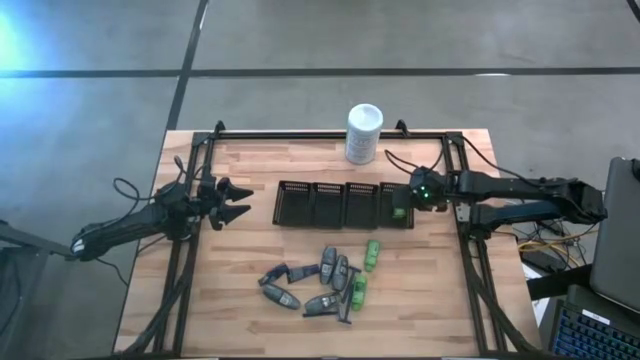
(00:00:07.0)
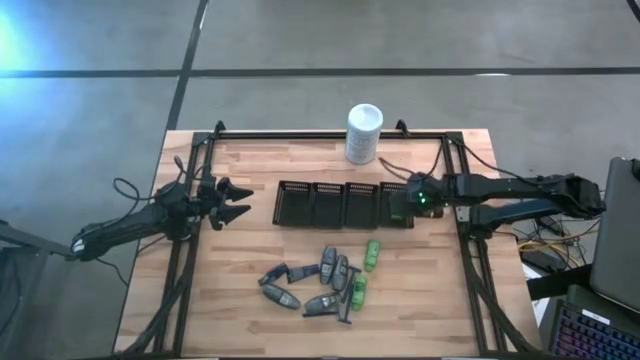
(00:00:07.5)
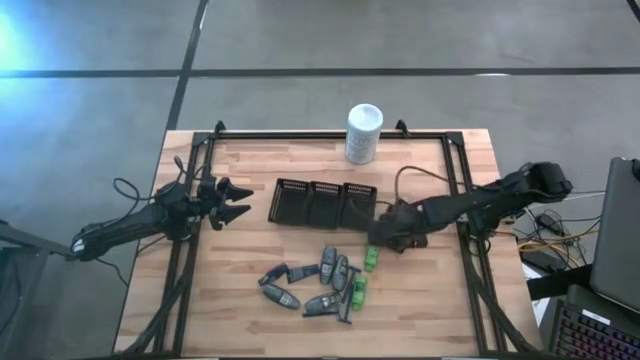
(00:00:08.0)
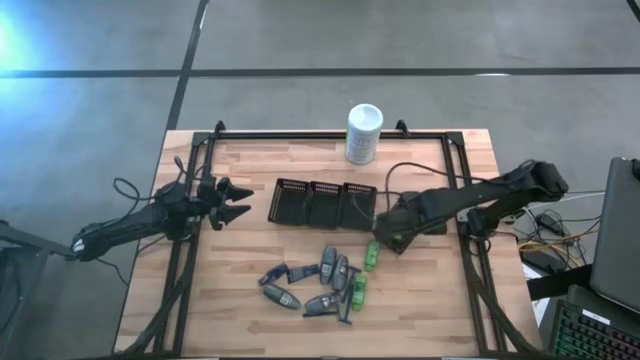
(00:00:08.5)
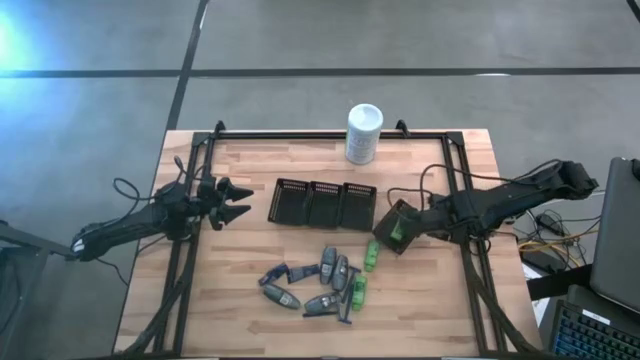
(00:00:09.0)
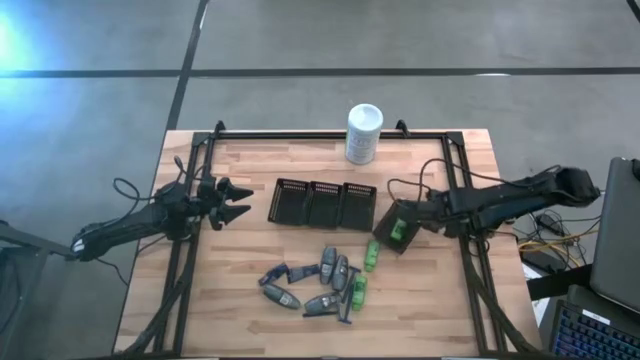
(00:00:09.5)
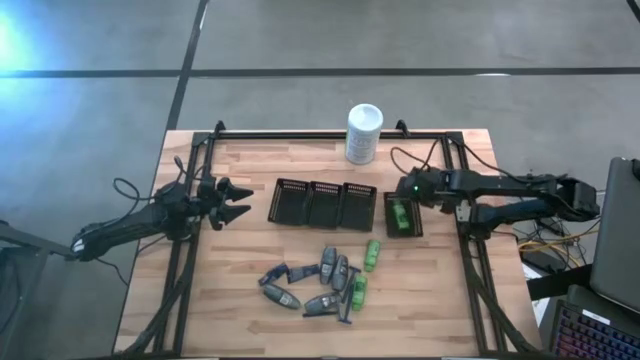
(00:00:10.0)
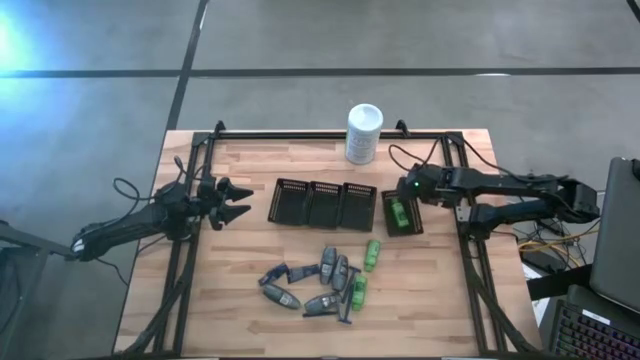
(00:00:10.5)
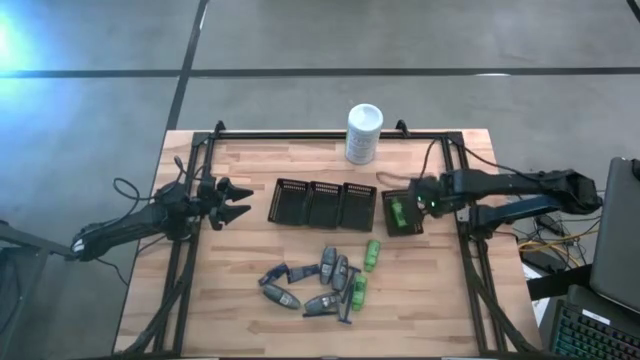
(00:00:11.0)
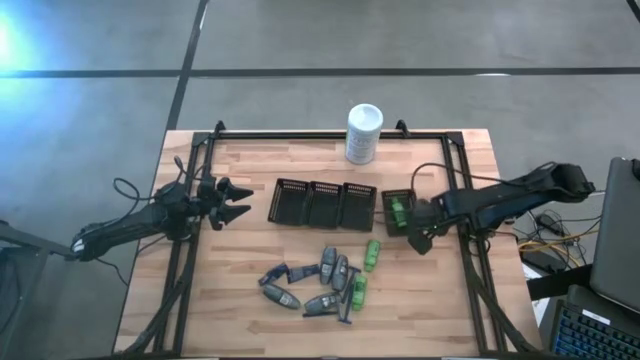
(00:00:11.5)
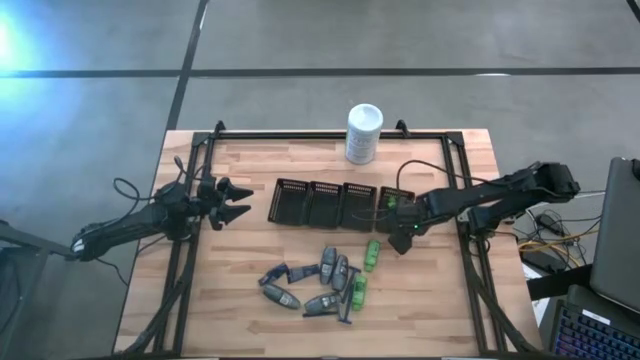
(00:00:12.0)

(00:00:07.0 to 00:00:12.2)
Task: Pick & Place Travel size toiletries
Adjust the black bin on the table

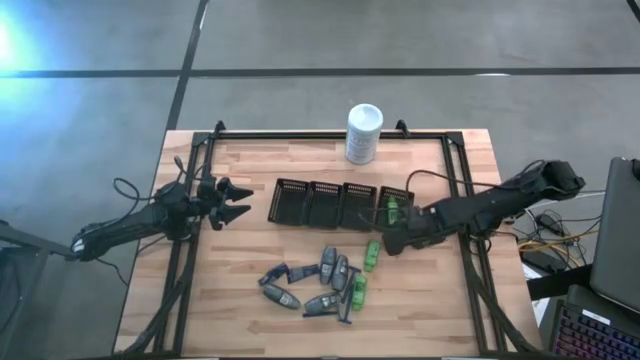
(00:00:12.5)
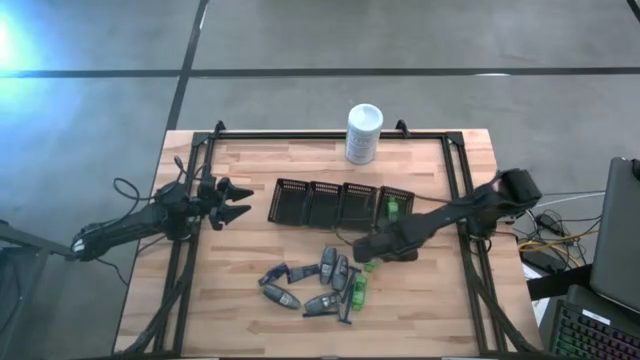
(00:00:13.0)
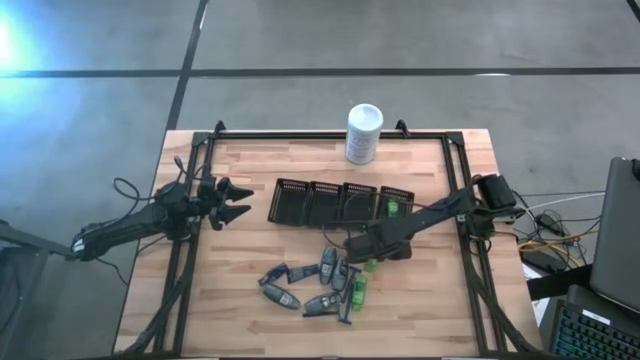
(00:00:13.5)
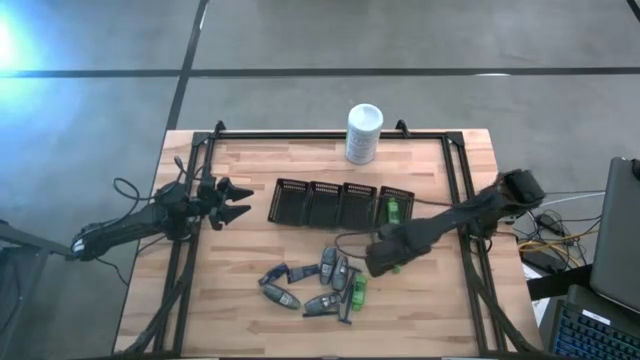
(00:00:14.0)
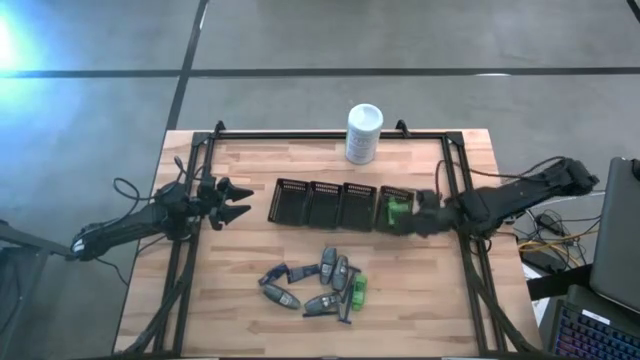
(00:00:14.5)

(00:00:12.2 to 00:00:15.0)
Put the green shampoo into the right black bin

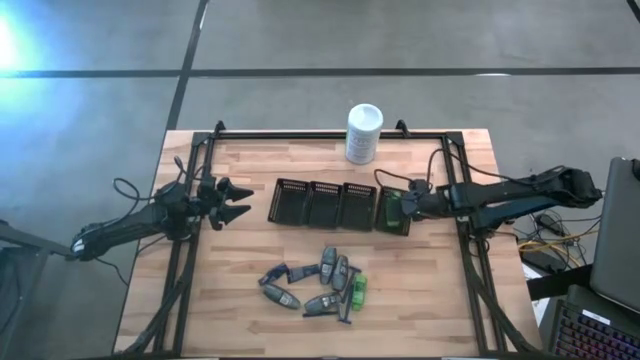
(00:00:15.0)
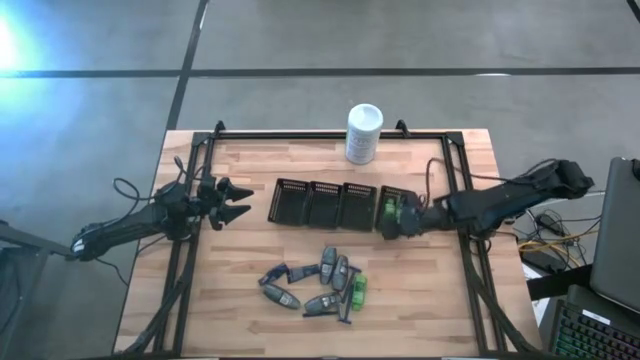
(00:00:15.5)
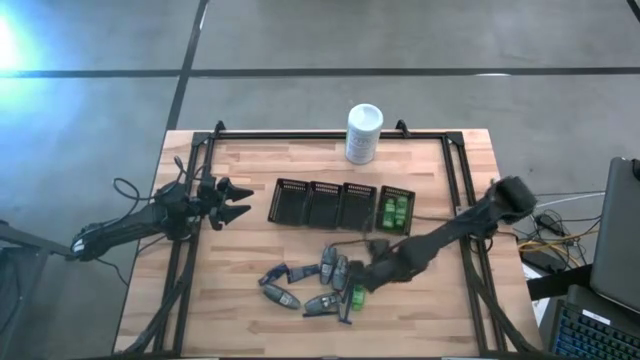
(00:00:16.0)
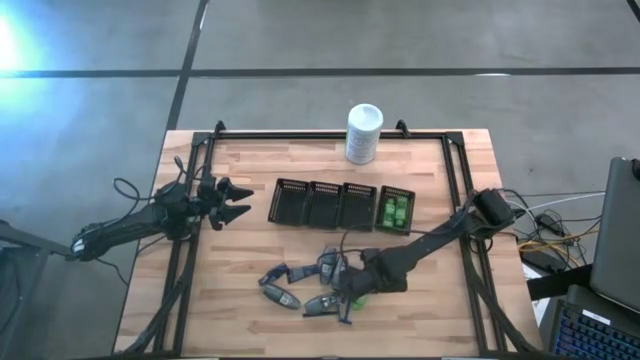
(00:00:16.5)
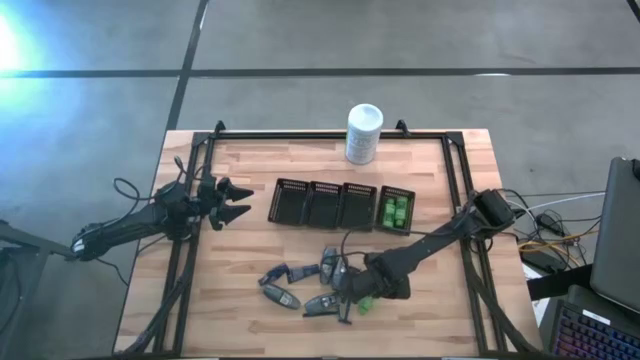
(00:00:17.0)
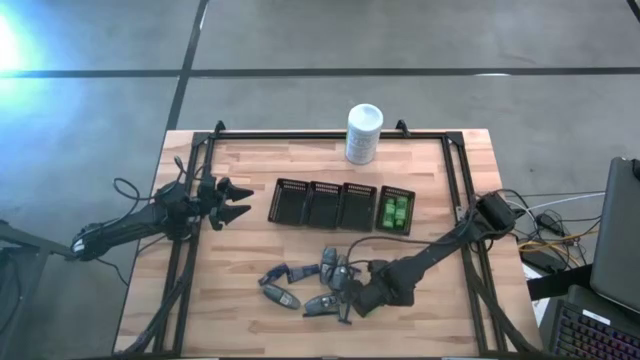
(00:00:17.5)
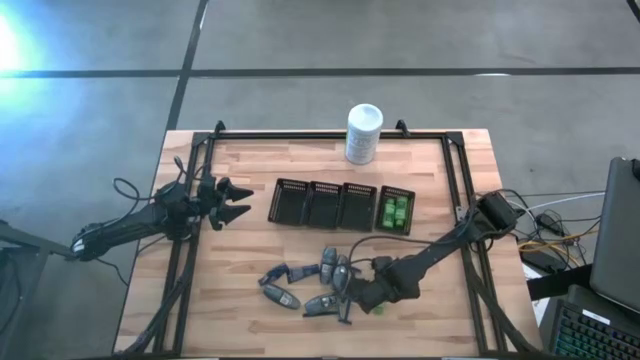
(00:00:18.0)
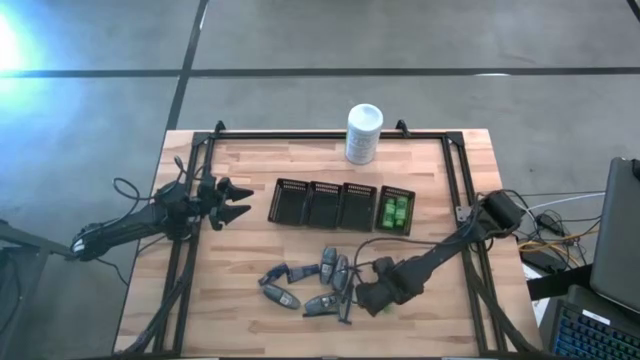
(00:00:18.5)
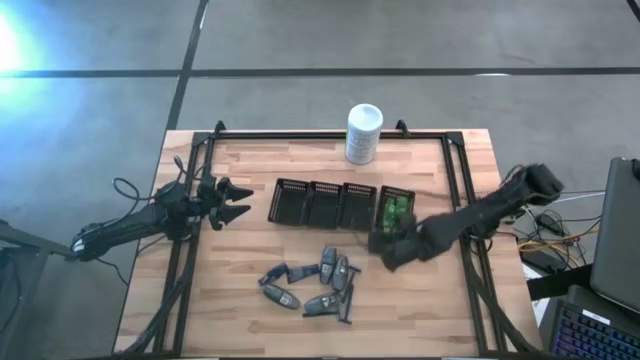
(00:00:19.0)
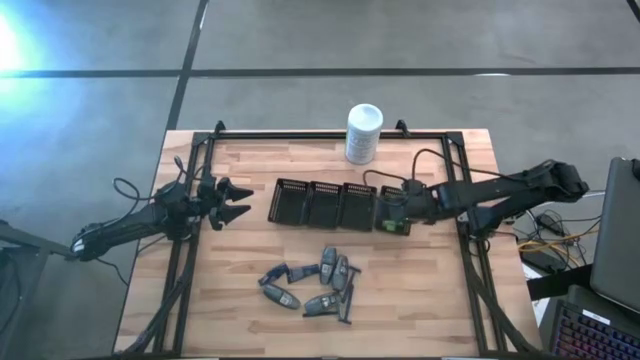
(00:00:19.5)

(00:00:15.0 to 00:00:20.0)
Put the green shampoo into the right black bin

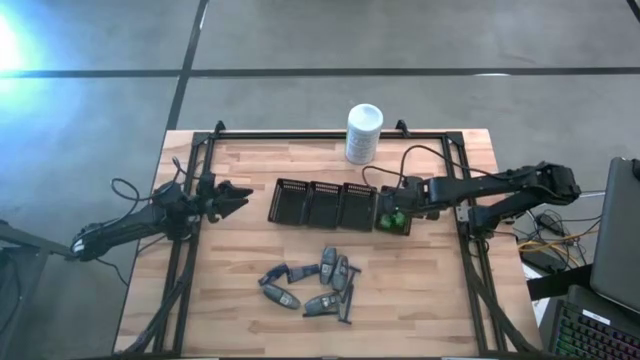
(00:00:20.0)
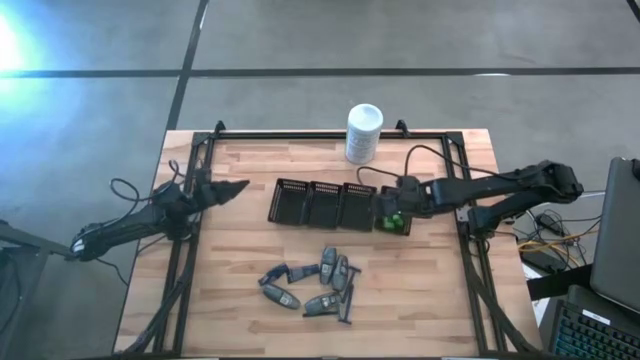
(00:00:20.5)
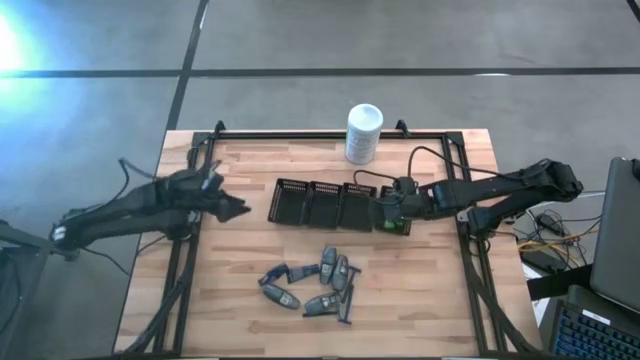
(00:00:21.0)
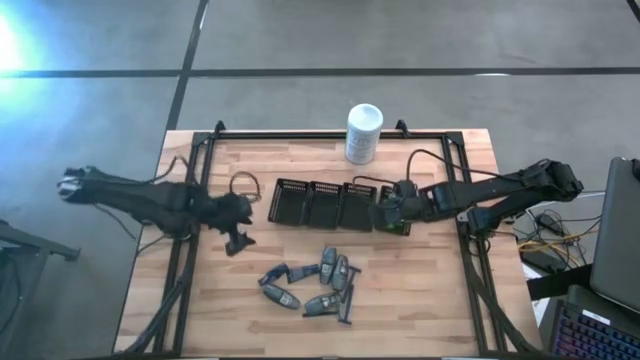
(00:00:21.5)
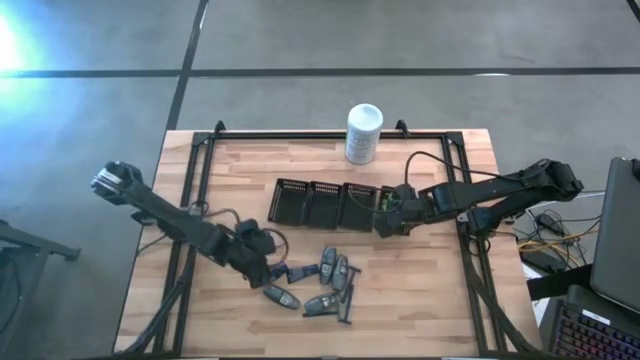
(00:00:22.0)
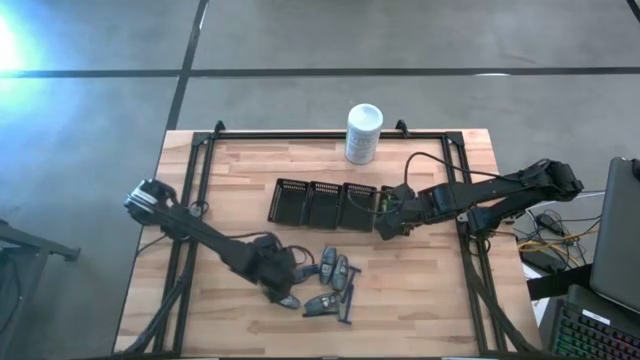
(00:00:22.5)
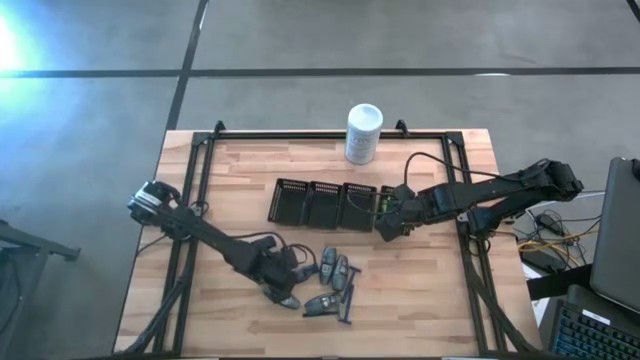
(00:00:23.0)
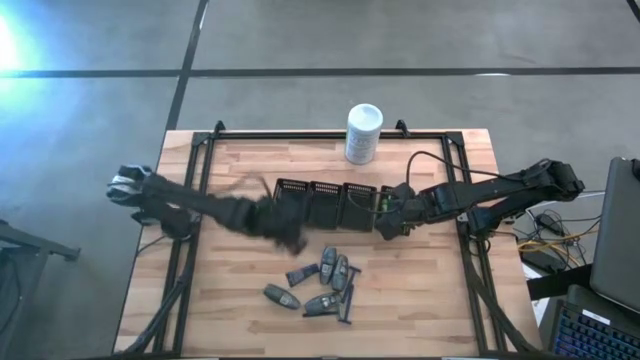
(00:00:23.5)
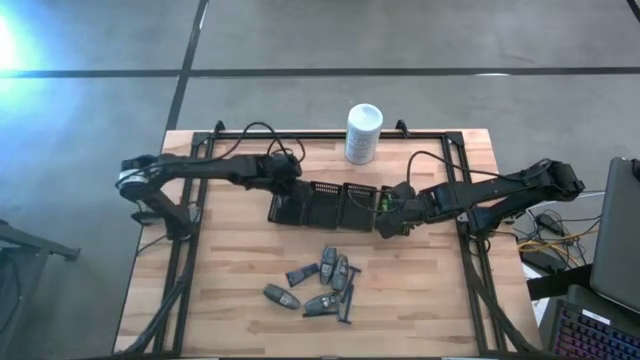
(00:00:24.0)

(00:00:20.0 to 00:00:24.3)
Put the blue shave cream into the left black bin

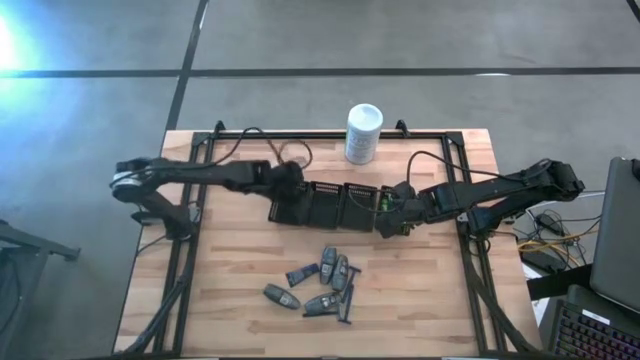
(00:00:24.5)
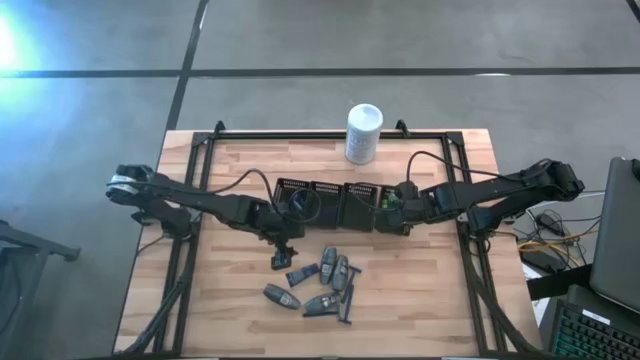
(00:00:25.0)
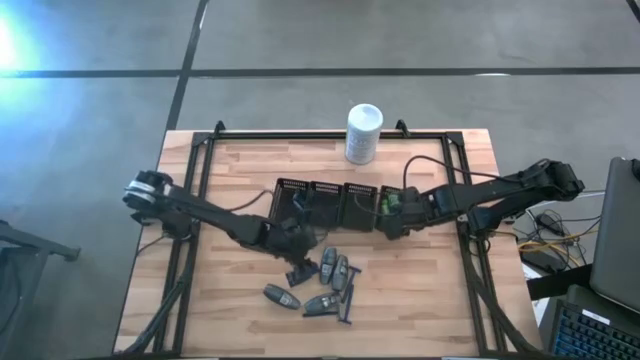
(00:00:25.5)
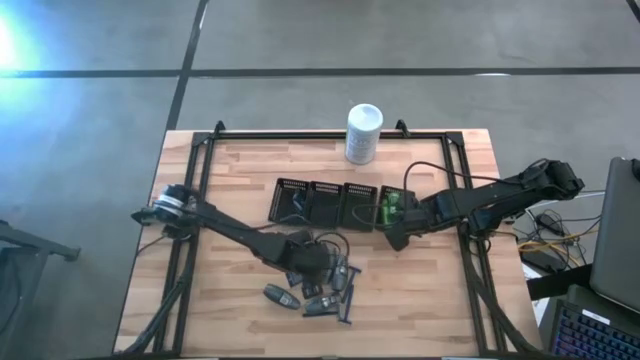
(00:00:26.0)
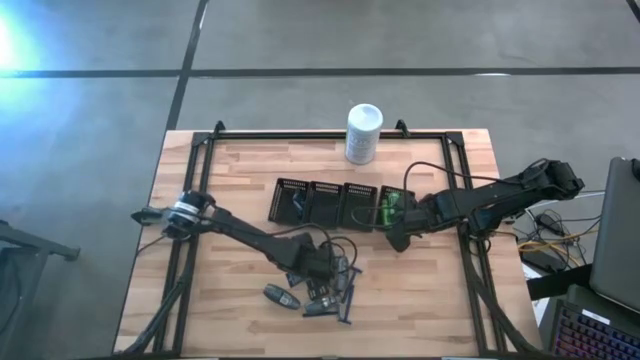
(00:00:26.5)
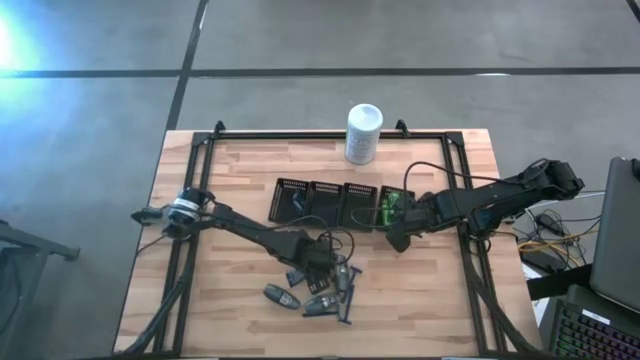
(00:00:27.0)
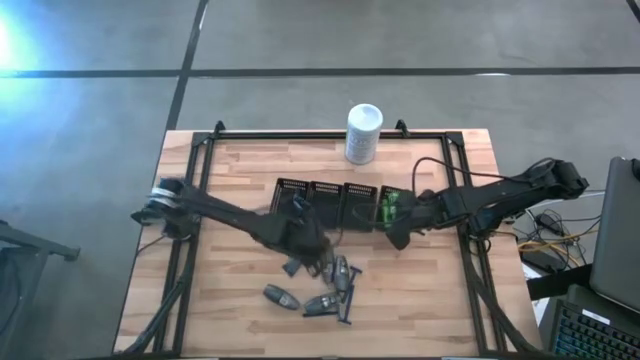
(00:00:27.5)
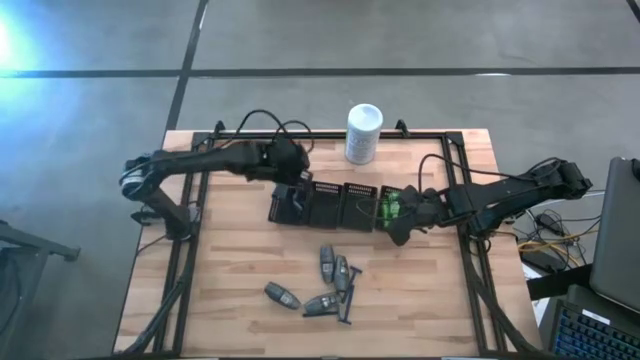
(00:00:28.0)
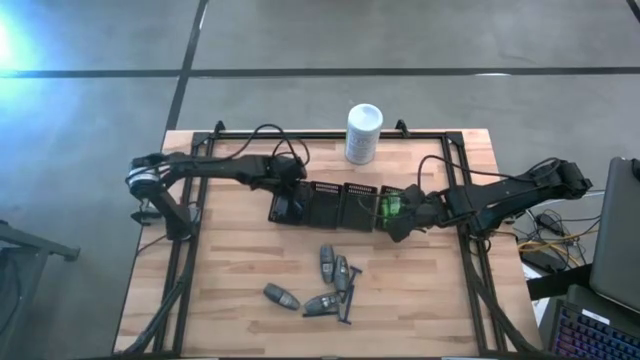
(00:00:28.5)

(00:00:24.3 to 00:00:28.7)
Put the blue shave cream into the left black bin
